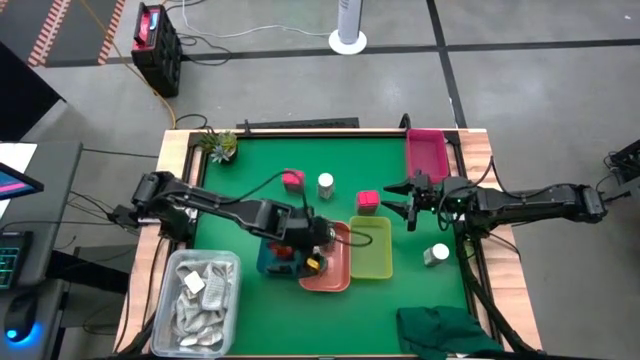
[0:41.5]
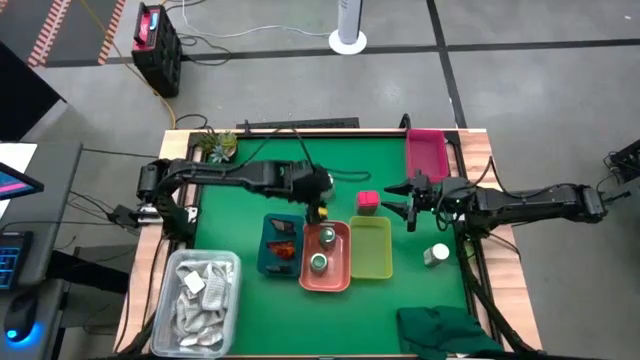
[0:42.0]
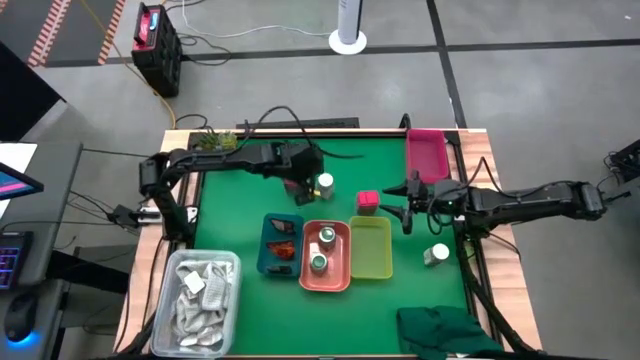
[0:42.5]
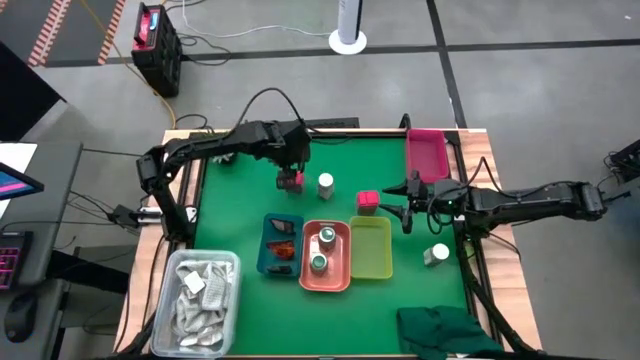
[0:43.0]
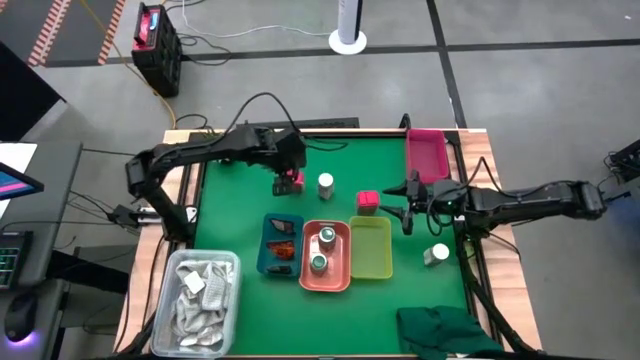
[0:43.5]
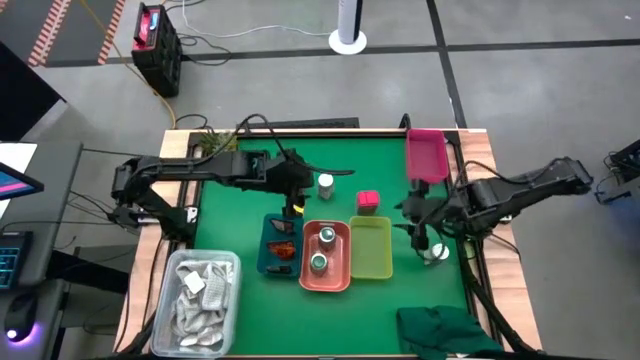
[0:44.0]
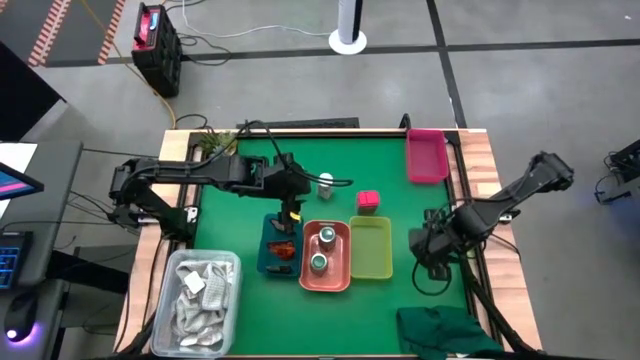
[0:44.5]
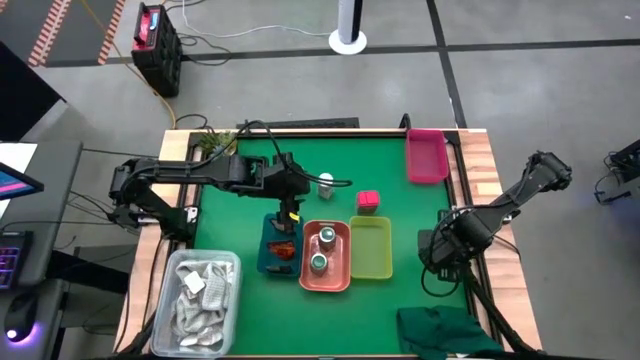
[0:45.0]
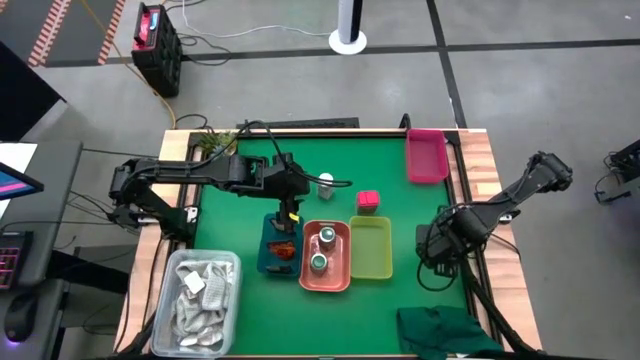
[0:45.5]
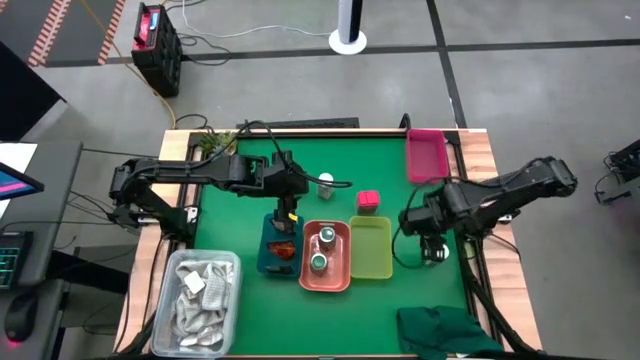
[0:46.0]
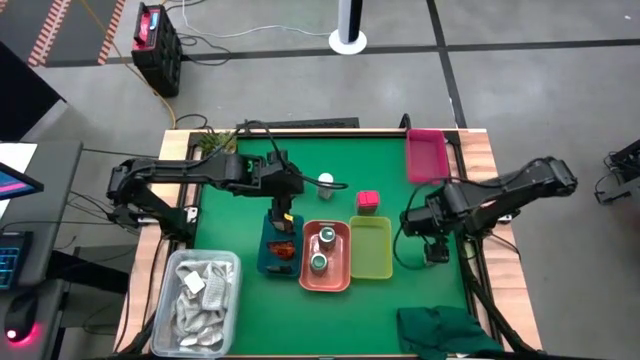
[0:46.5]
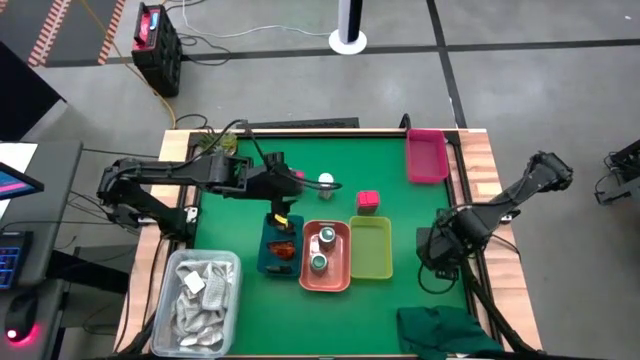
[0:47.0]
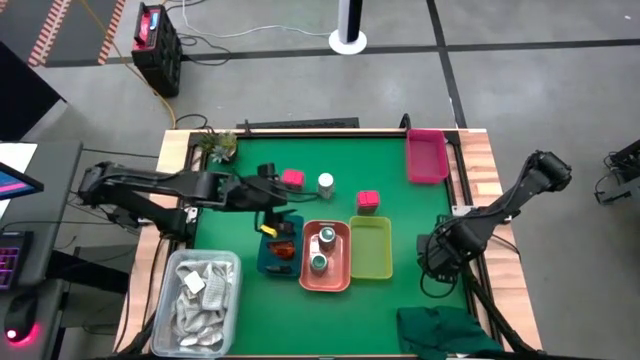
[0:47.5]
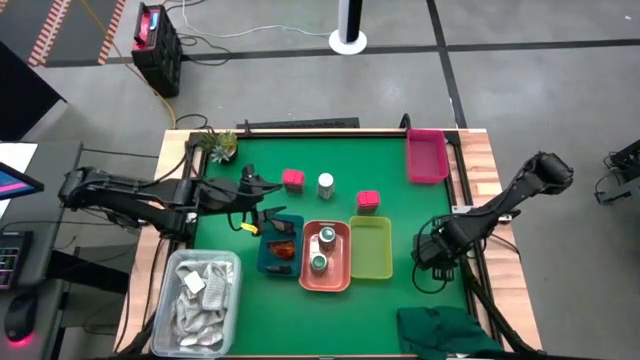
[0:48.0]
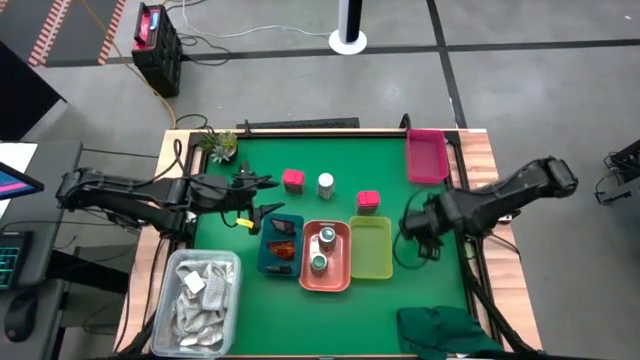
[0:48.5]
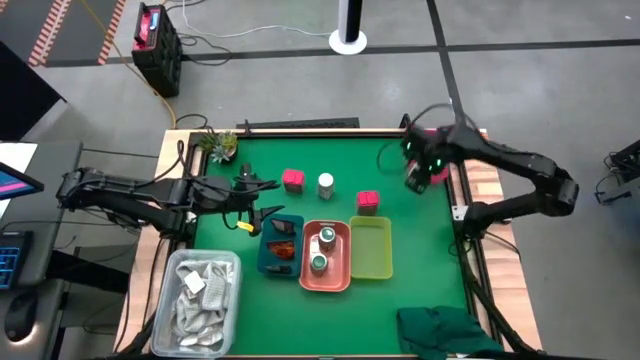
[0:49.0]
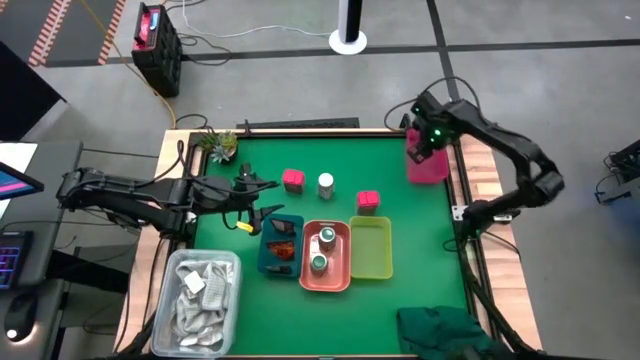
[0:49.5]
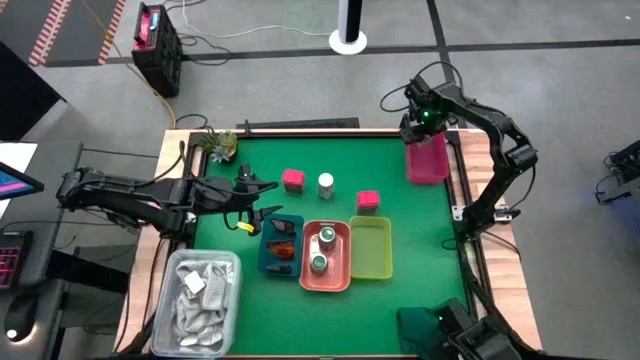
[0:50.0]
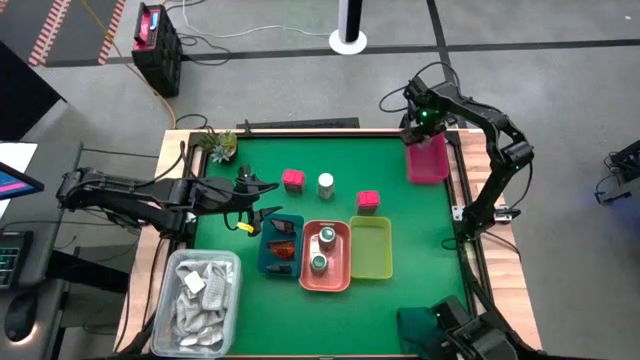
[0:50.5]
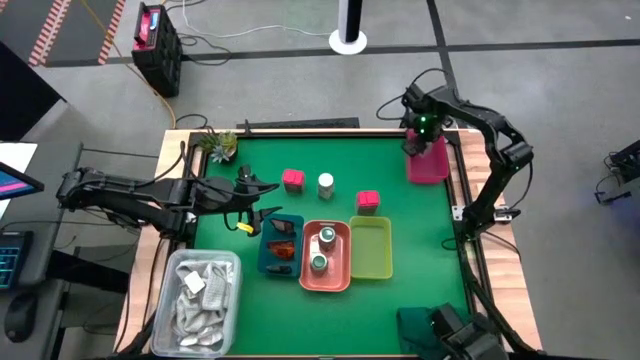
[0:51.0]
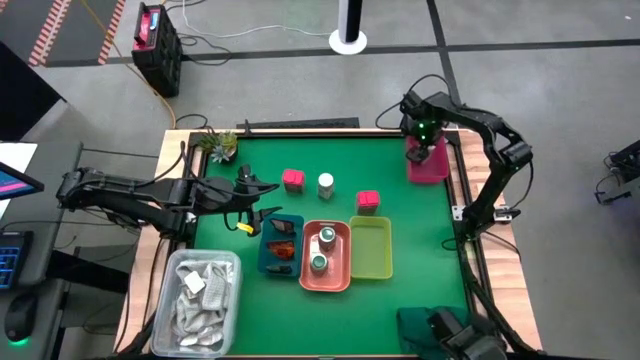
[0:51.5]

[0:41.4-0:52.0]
Task: Sort spices by type
Put the bottom white seasoning bottle into the red bin

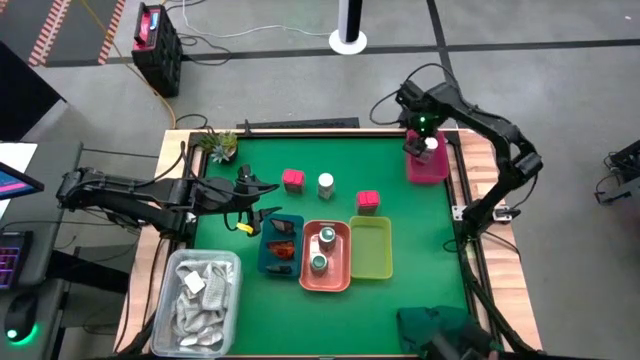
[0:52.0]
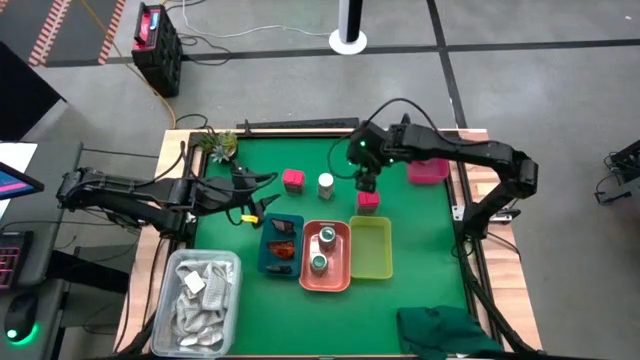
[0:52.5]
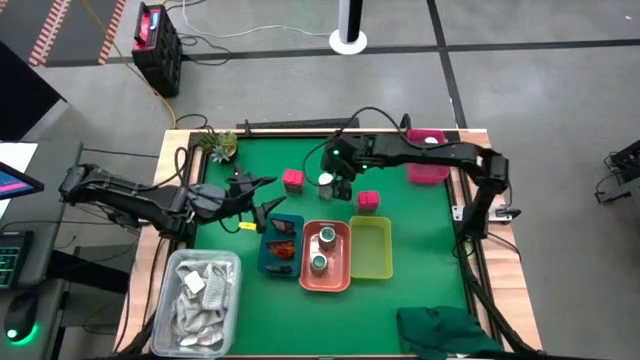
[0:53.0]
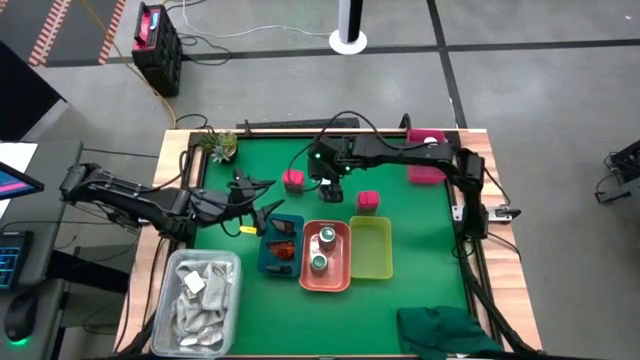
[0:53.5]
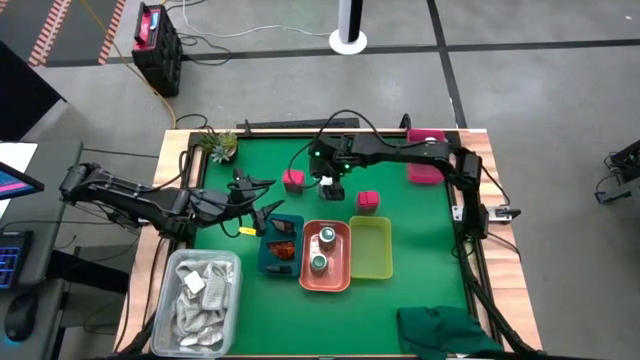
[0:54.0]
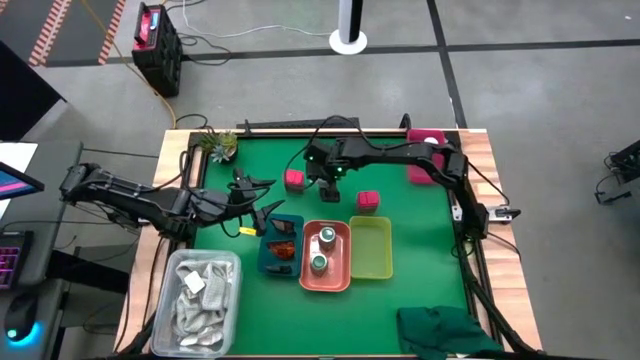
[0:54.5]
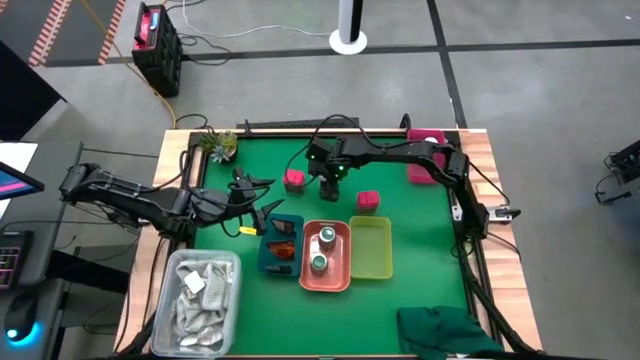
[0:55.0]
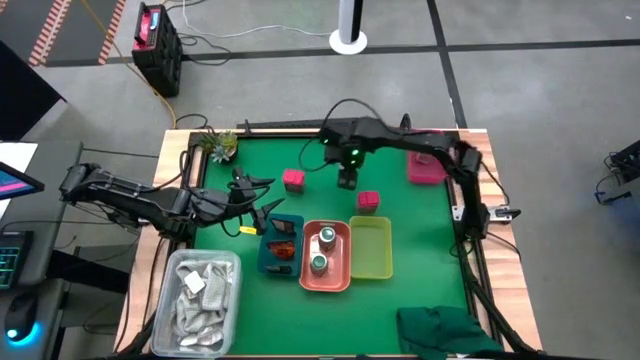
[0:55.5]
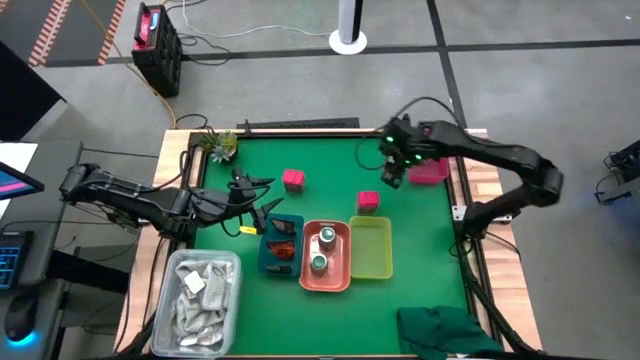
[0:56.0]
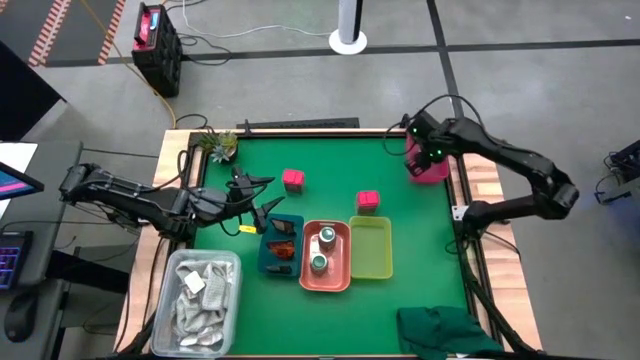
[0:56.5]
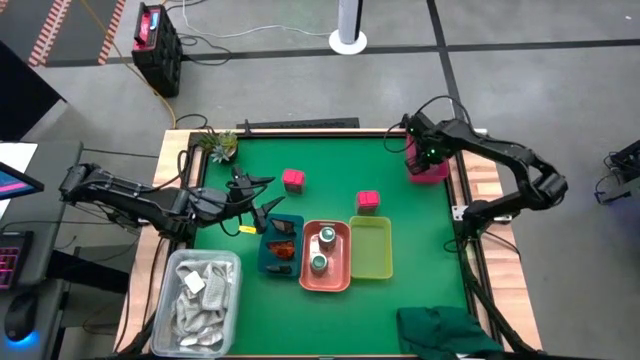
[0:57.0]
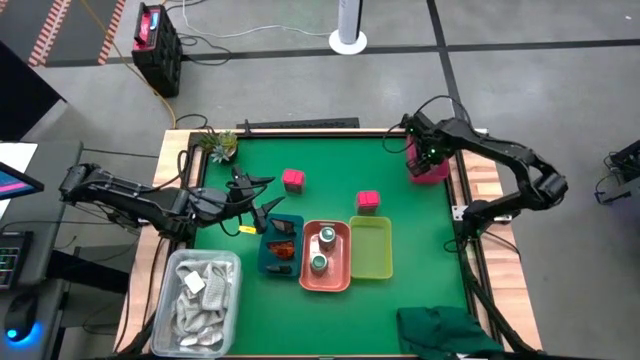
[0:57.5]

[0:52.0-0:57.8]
Put the white seasoning bottle into the red bin

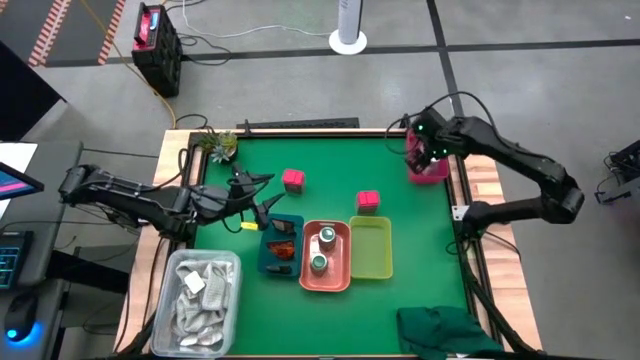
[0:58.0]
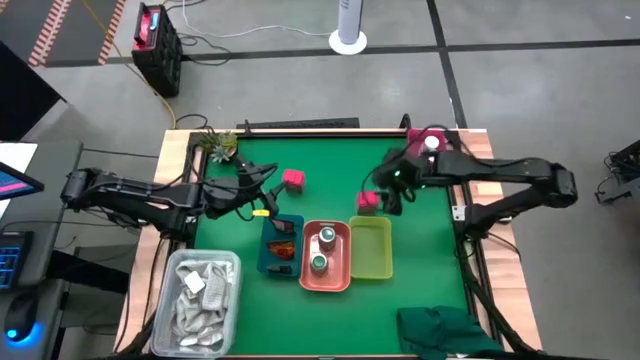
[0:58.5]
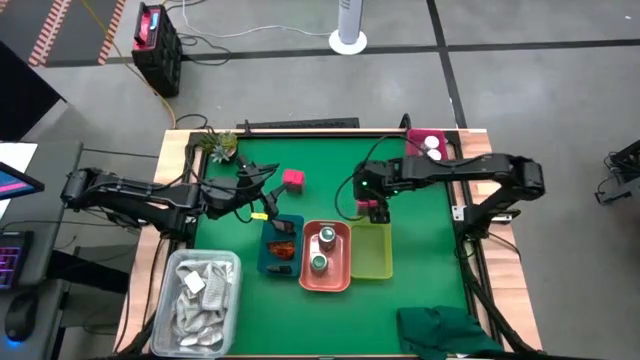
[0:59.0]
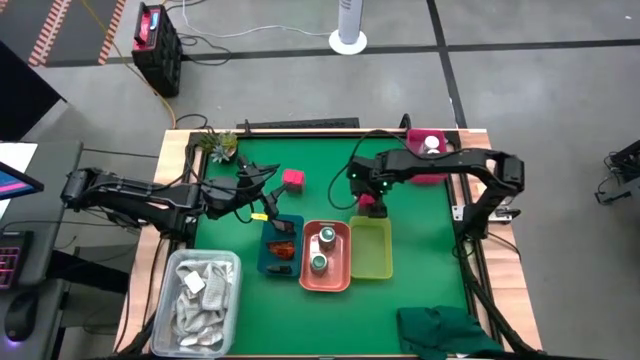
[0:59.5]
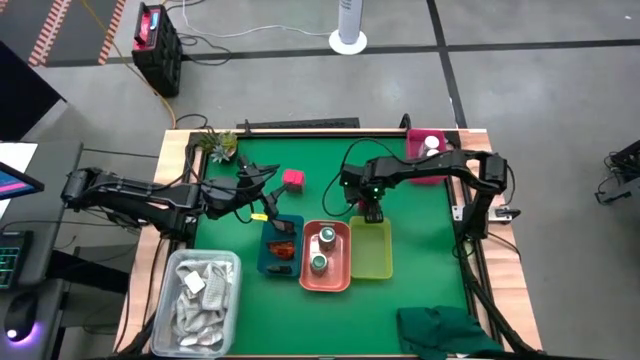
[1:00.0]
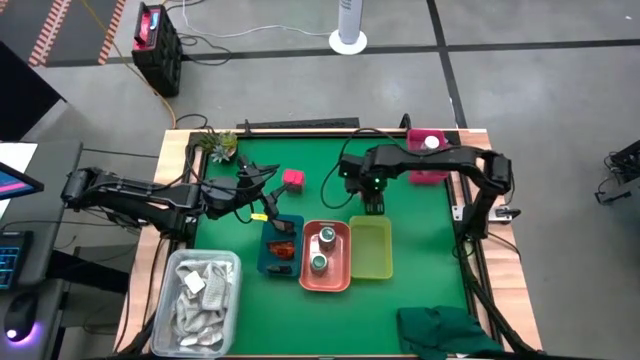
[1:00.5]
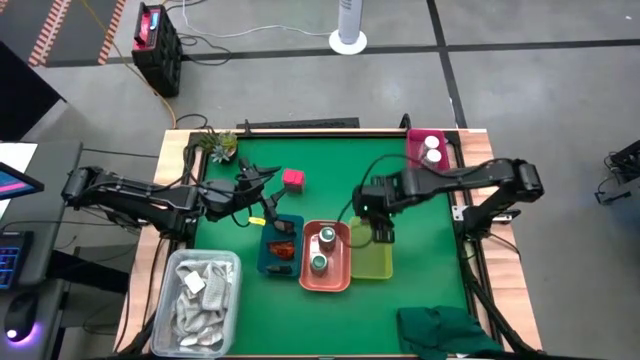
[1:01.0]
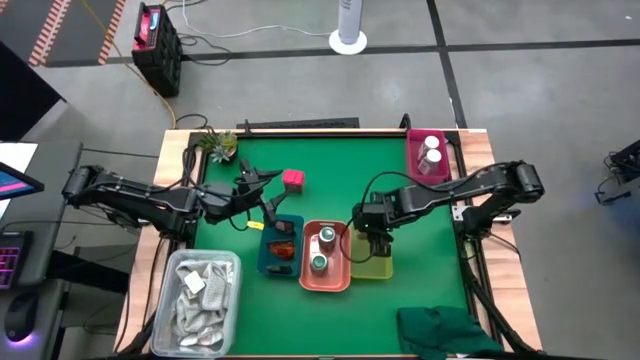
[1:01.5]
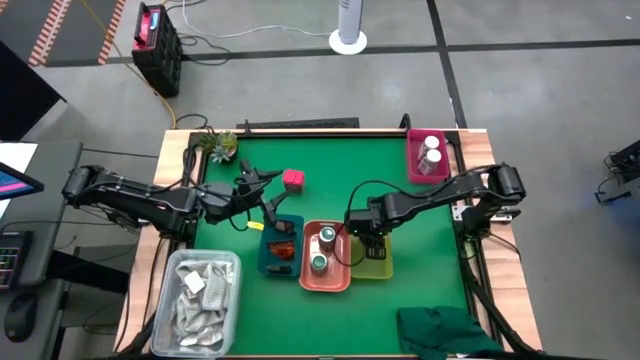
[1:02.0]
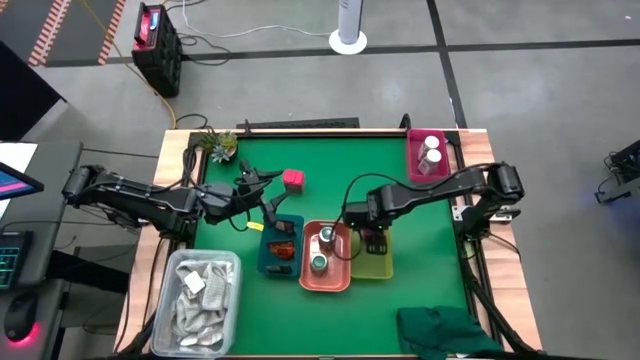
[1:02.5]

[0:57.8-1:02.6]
Put the right red seasoning can into the yellow bin
